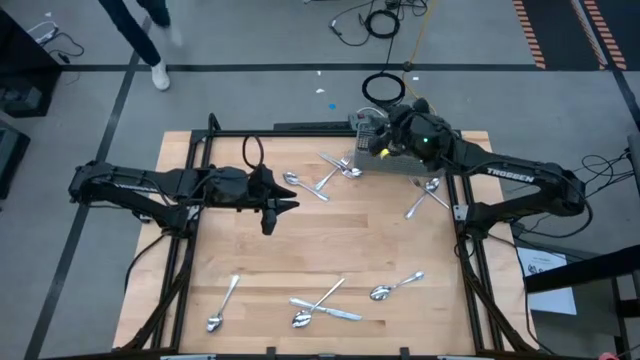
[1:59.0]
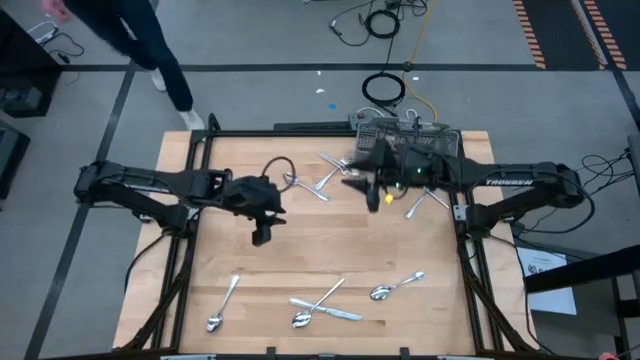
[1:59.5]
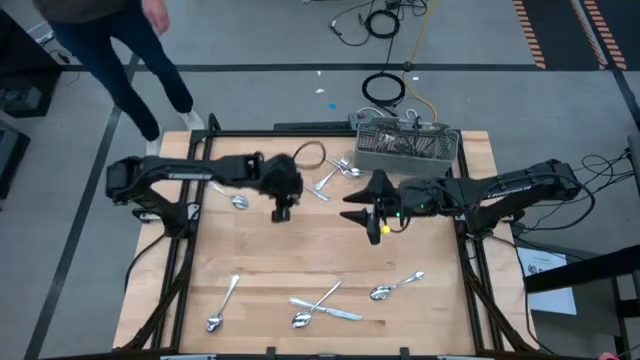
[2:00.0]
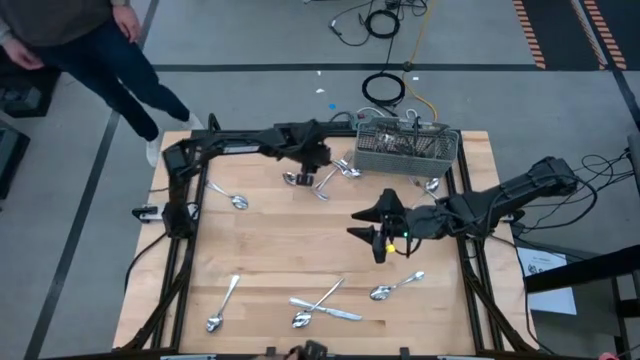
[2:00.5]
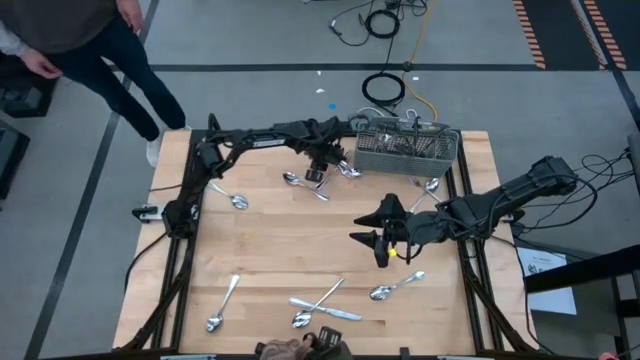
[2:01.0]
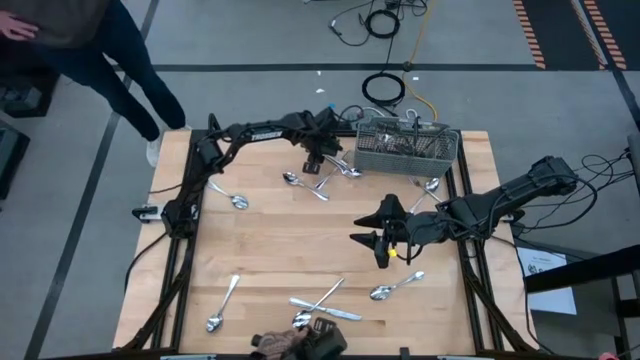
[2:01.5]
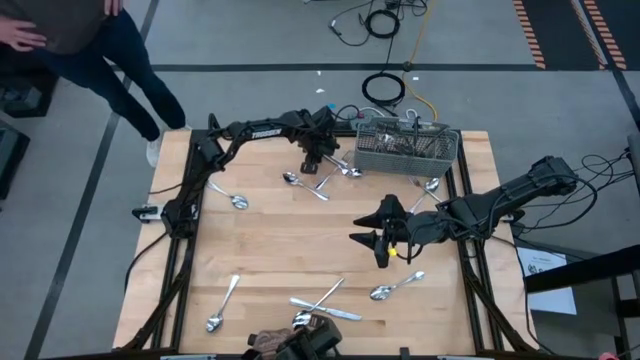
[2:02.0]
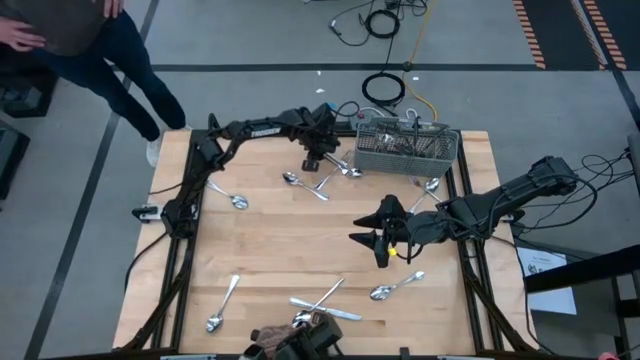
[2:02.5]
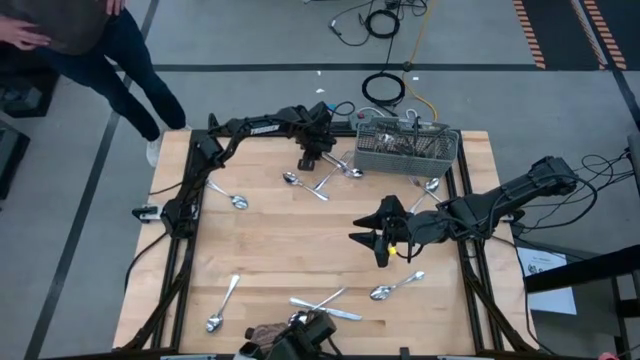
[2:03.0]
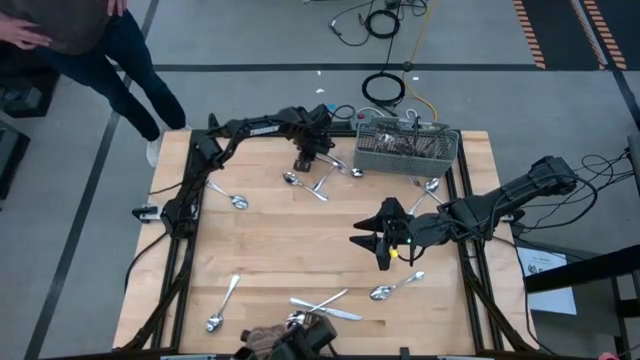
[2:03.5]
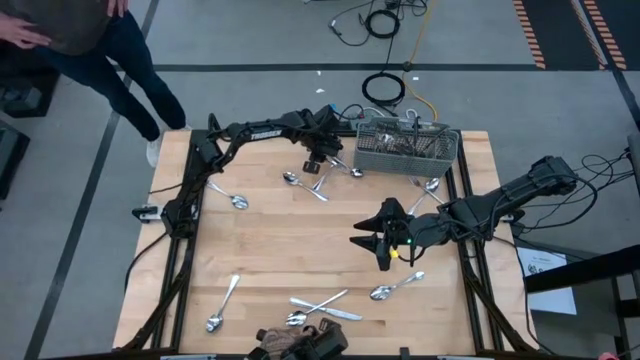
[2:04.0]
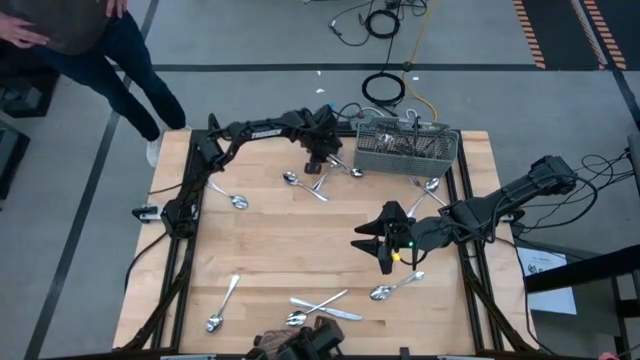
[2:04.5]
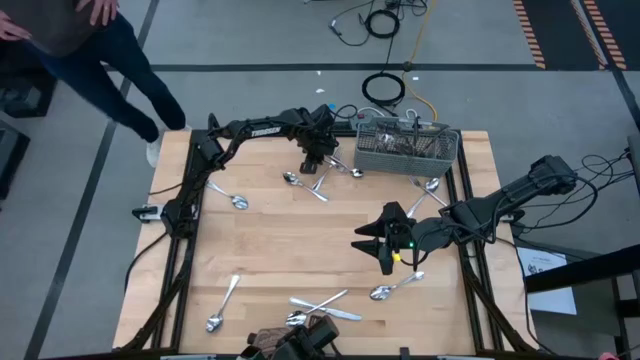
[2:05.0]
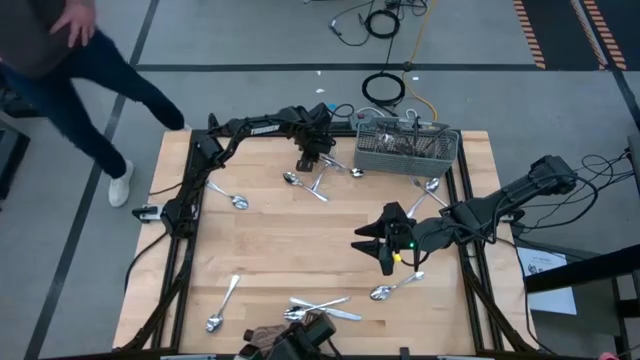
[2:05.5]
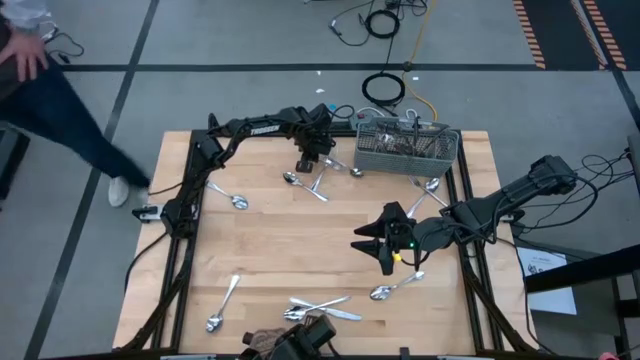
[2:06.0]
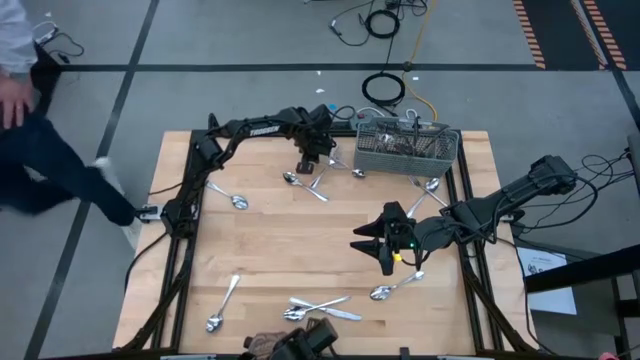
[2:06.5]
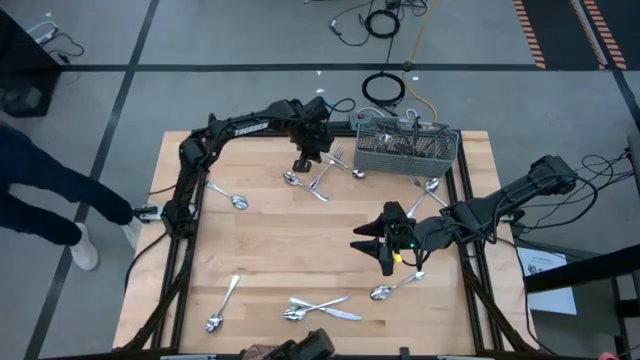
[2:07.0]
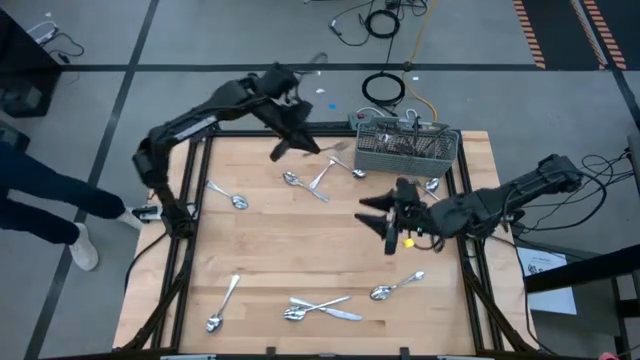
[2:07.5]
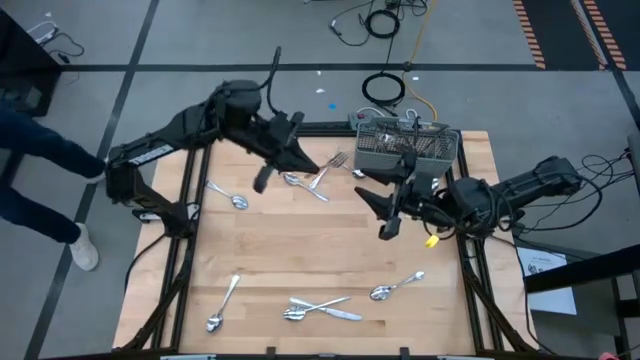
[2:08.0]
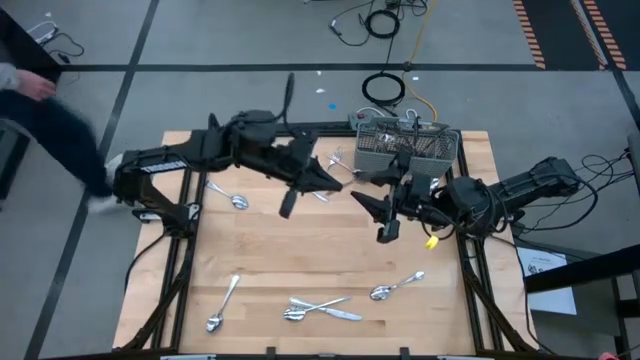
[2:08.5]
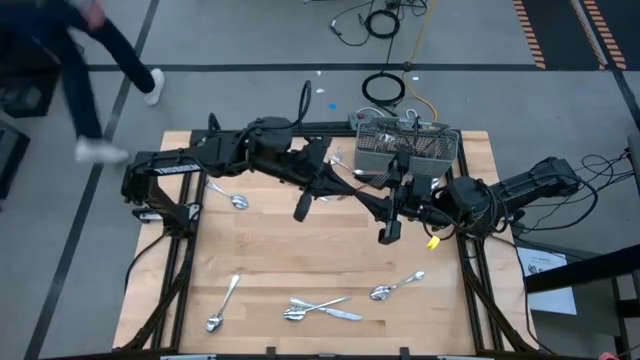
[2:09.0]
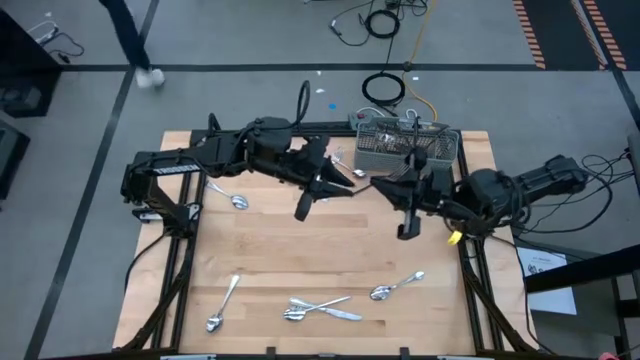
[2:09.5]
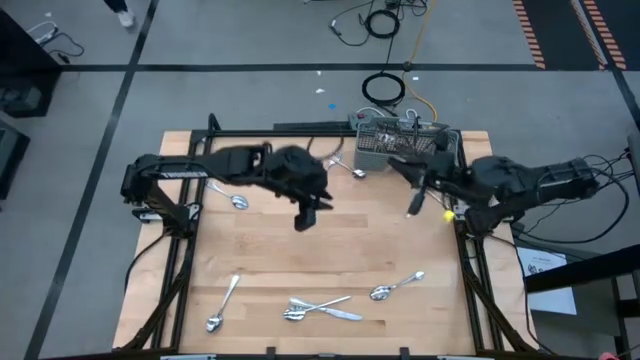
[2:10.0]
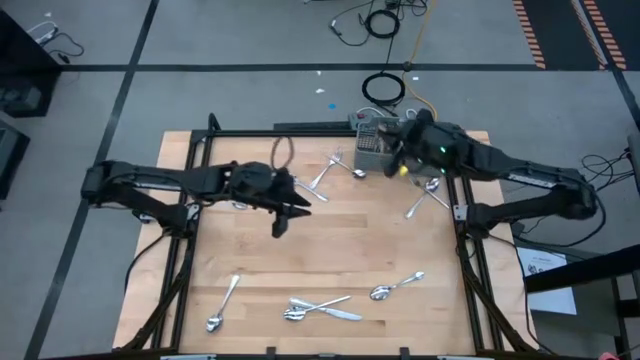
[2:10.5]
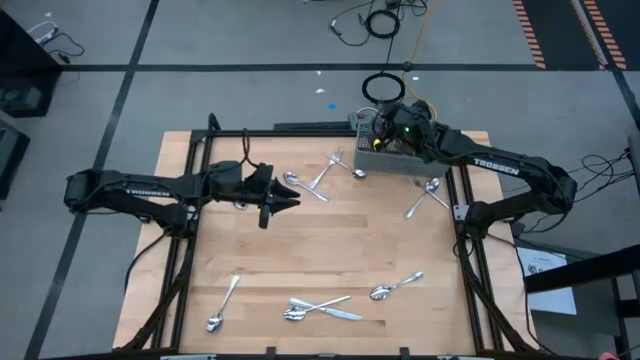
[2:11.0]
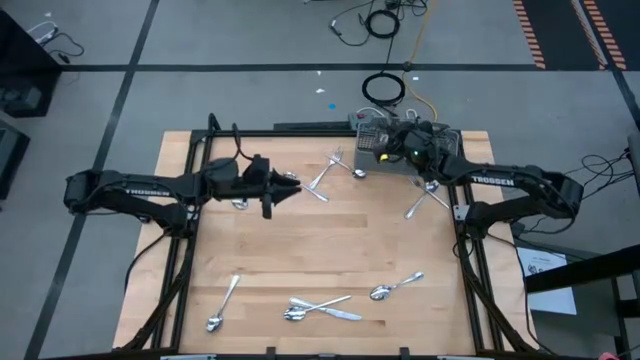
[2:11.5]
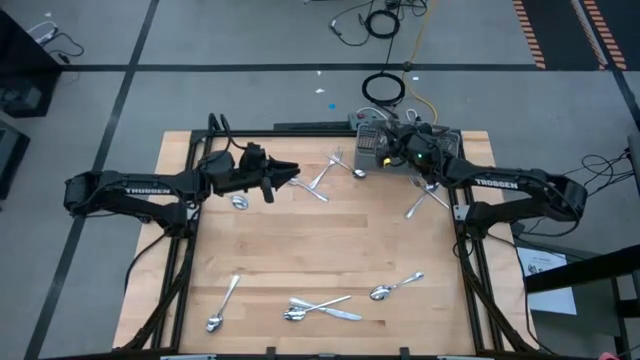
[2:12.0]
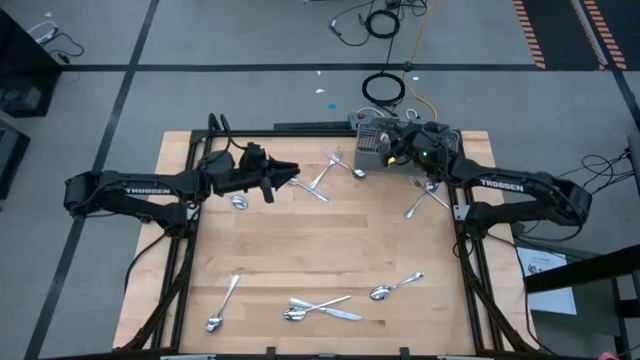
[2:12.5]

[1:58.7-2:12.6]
Task: Sort silverware
Put the silver fork into the gray utensil holder

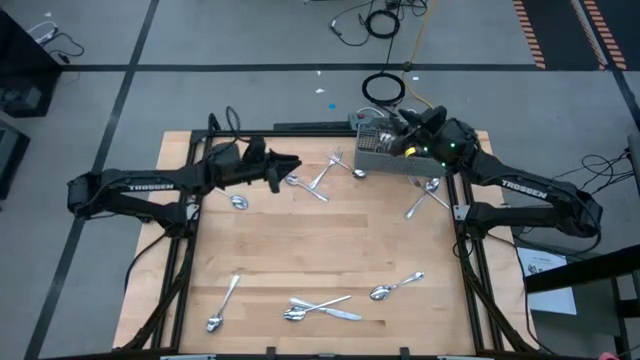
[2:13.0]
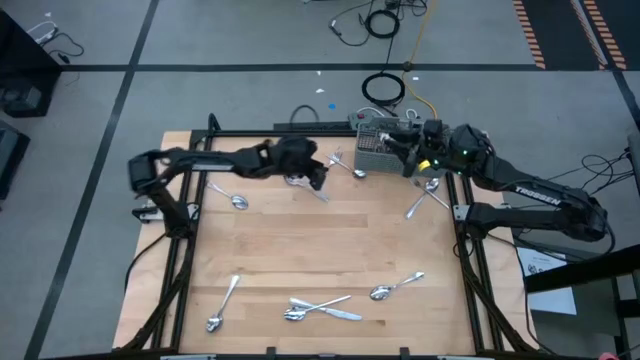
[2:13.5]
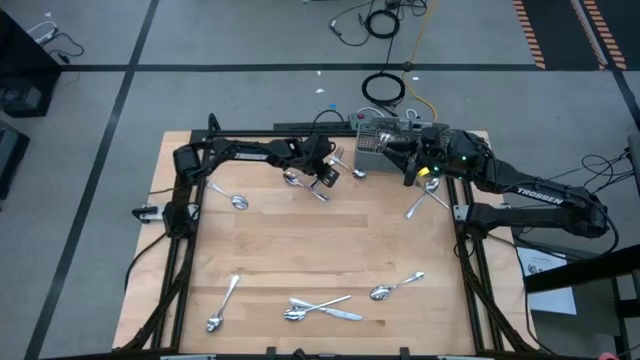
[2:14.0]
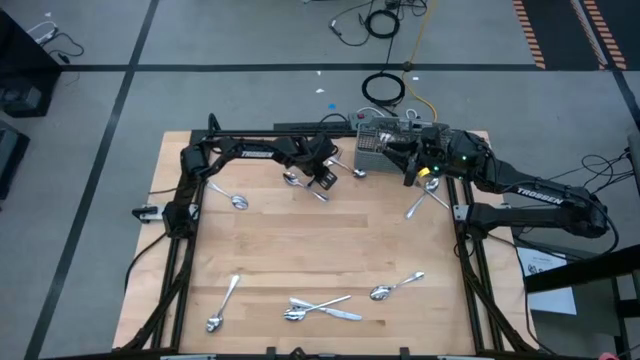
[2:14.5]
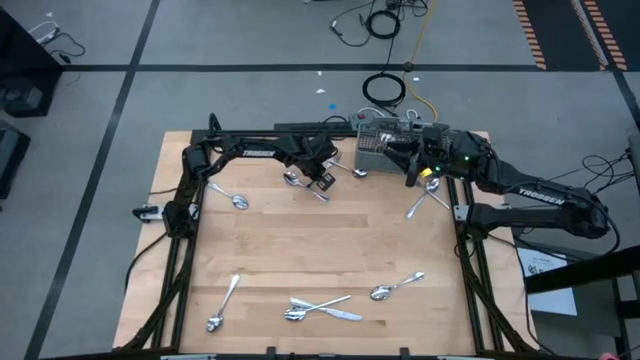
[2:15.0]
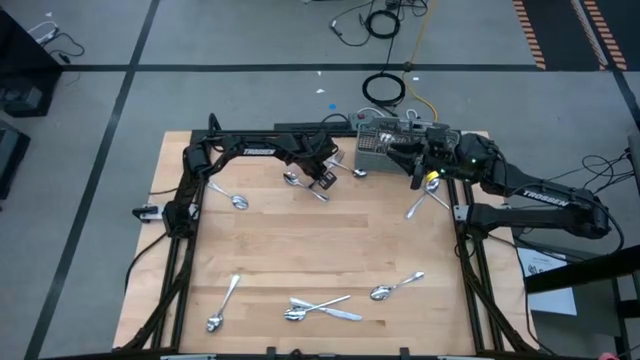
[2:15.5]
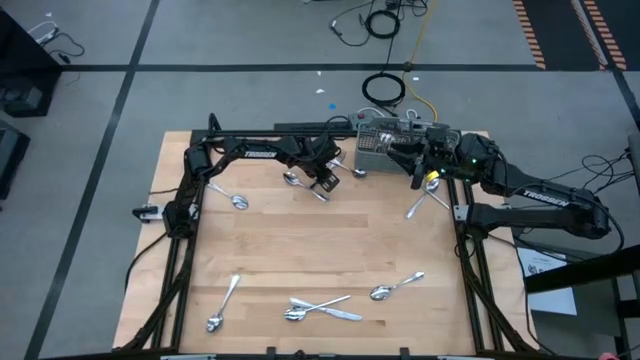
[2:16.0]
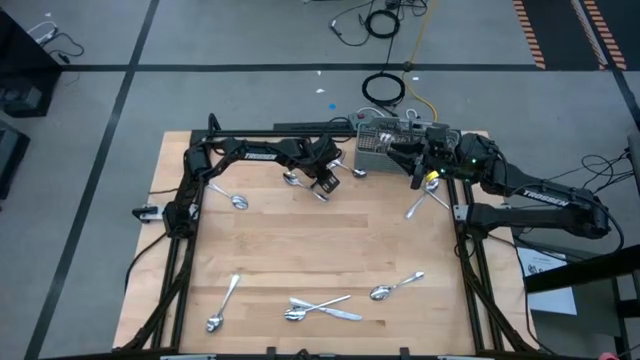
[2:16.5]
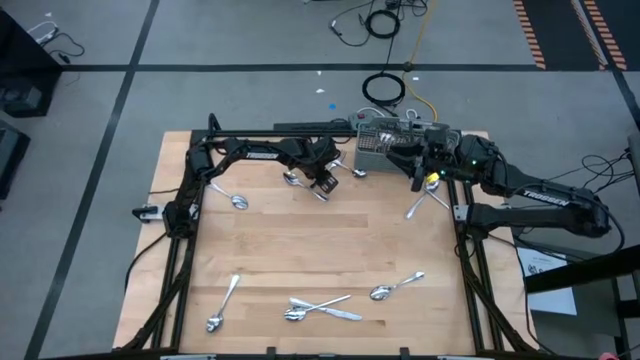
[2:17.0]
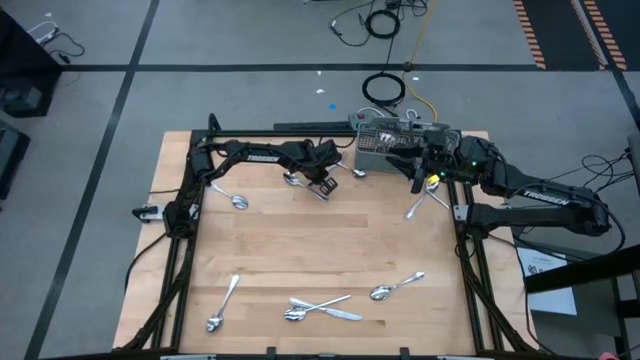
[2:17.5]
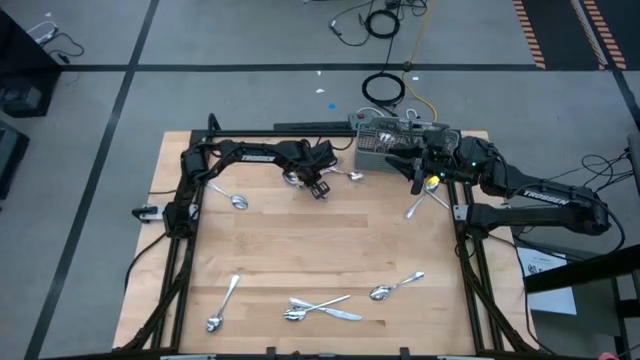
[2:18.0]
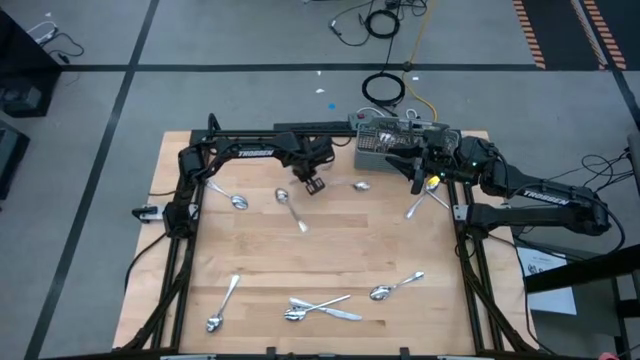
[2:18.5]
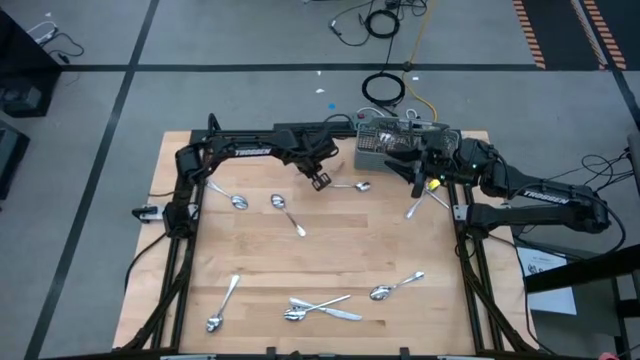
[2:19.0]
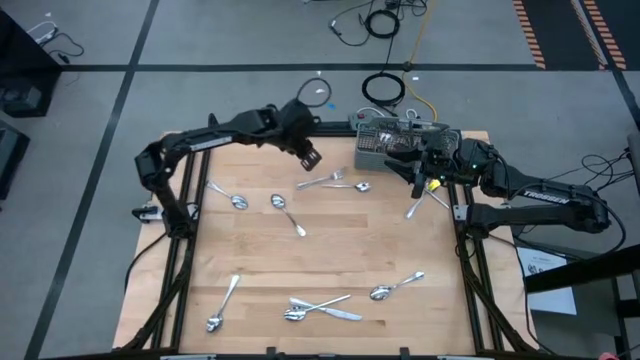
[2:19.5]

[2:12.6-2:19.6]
Put the silver fork into the gray utensil holder
